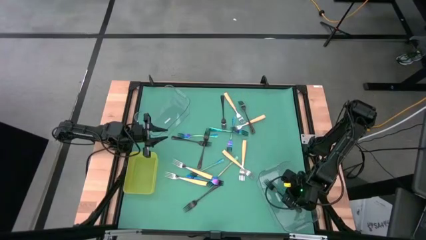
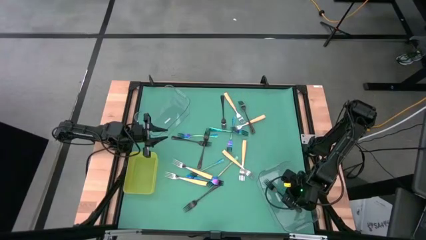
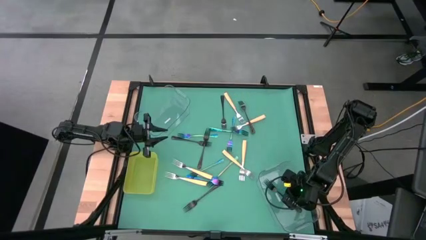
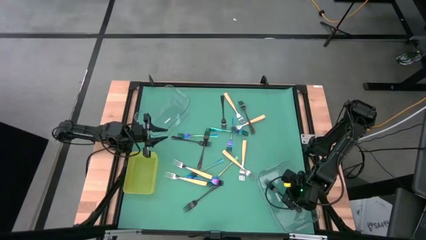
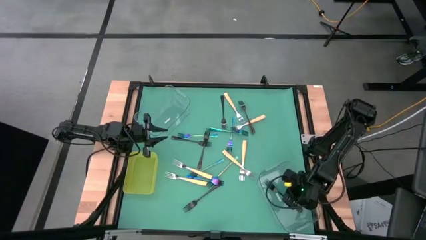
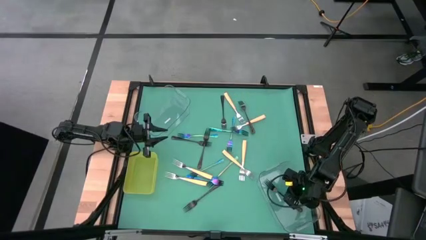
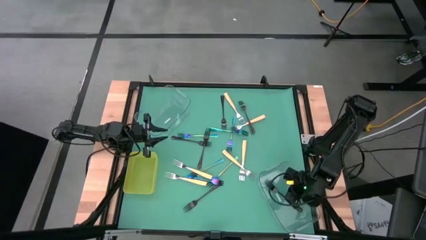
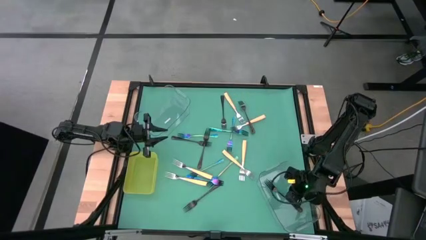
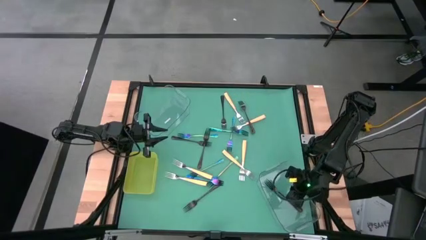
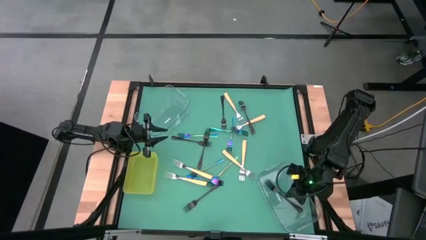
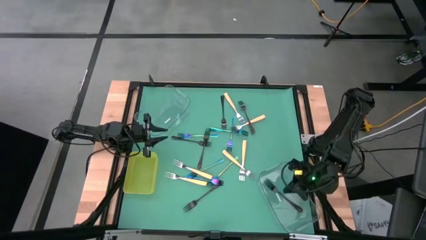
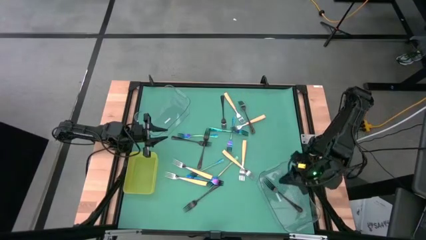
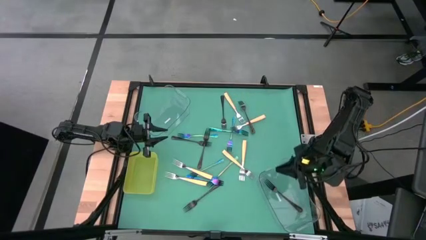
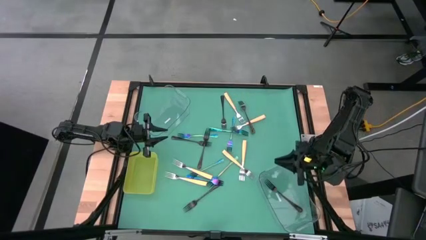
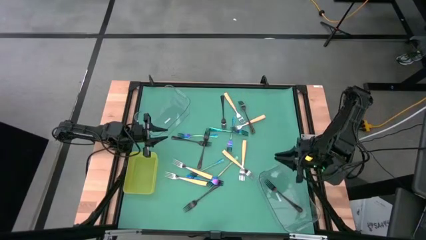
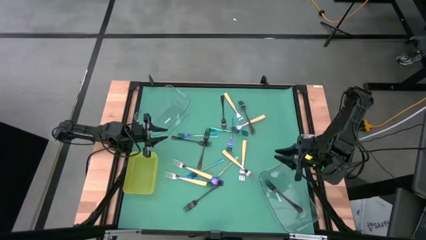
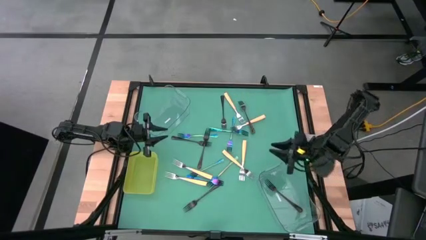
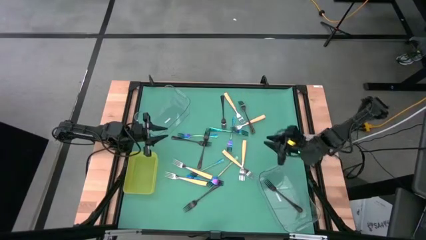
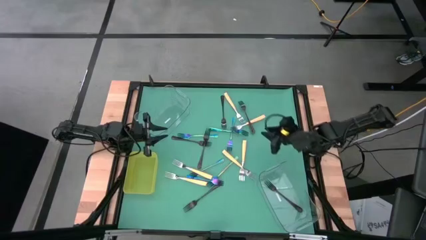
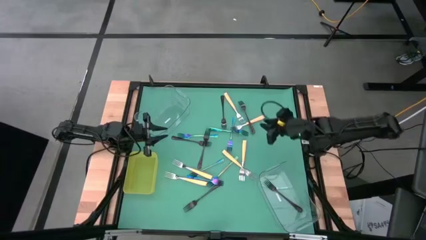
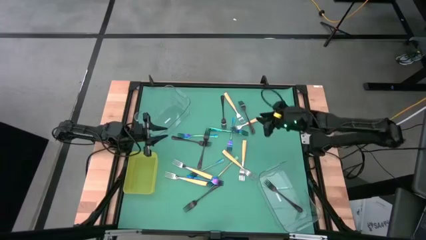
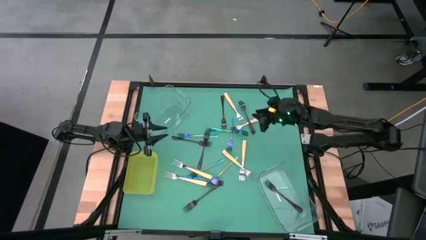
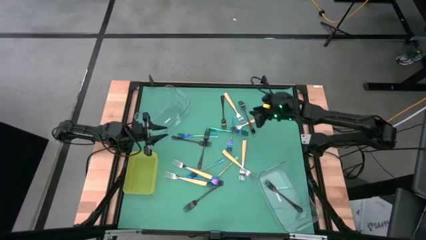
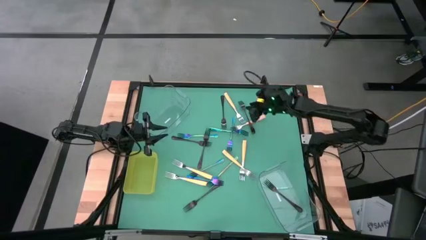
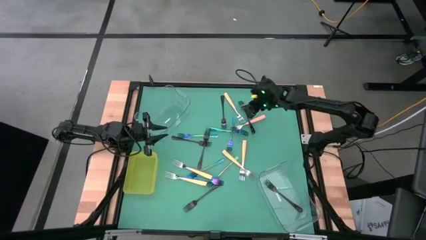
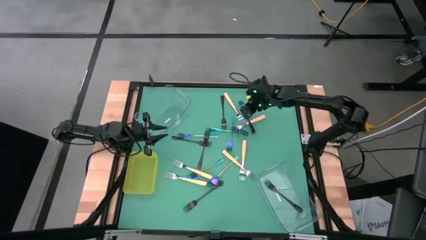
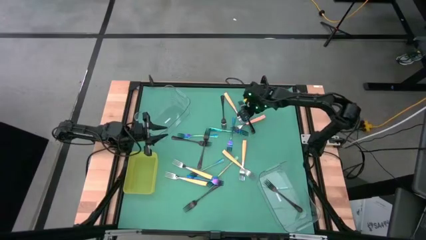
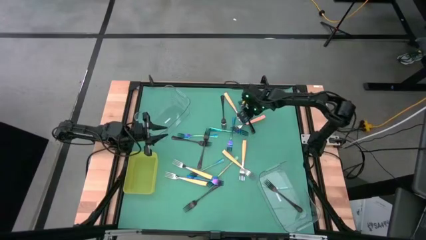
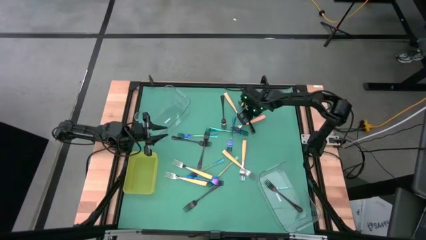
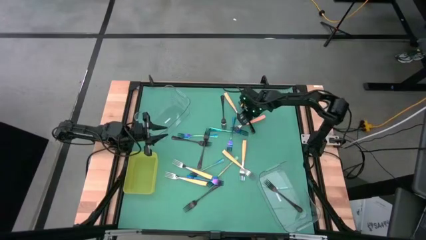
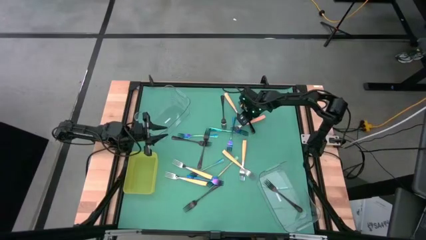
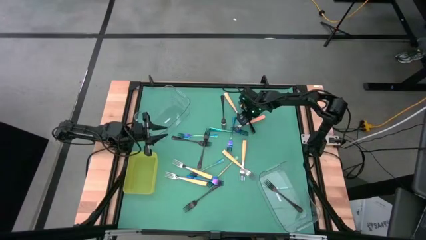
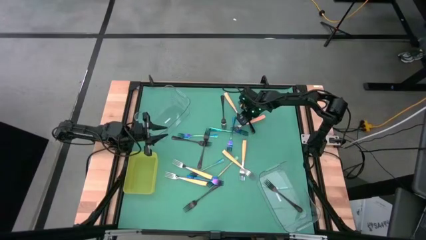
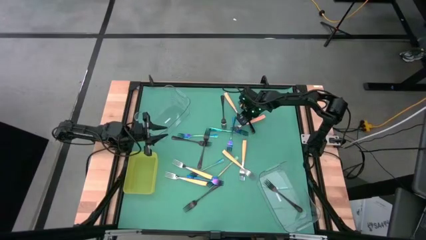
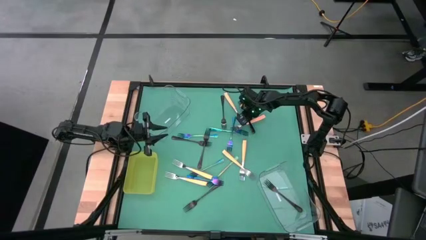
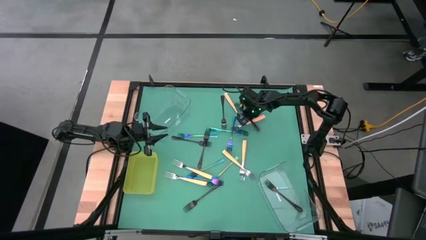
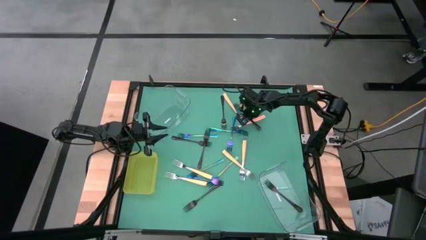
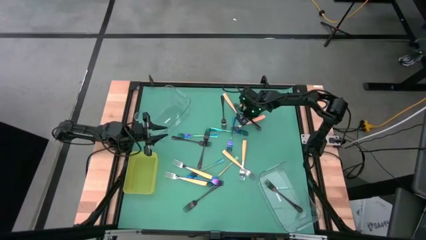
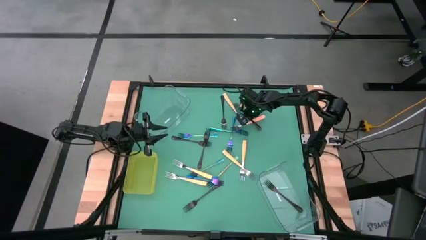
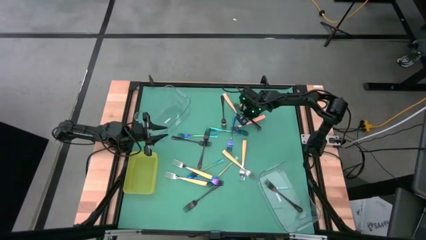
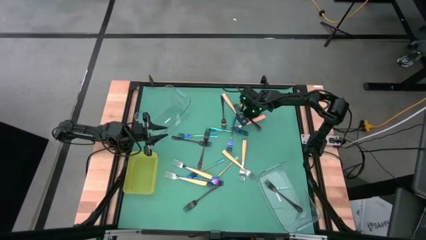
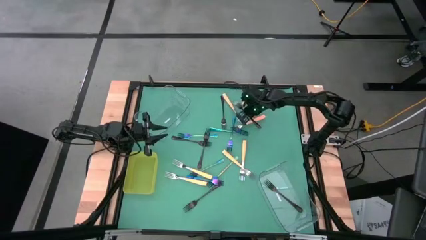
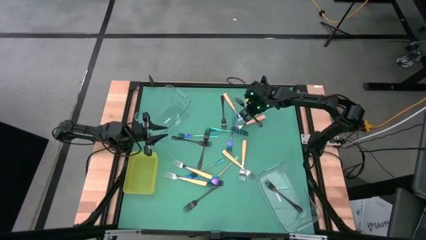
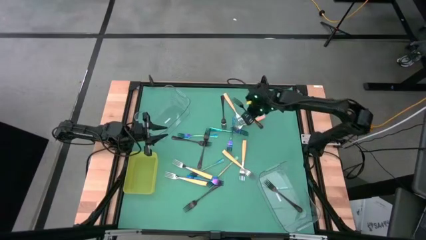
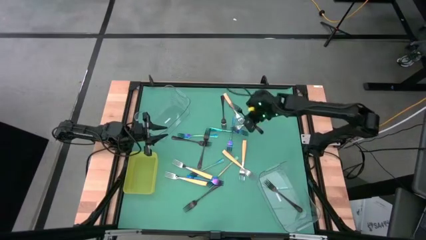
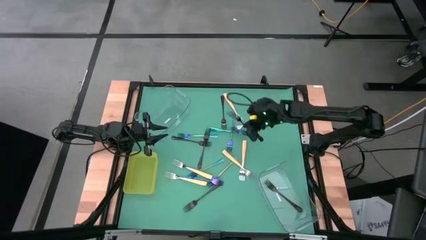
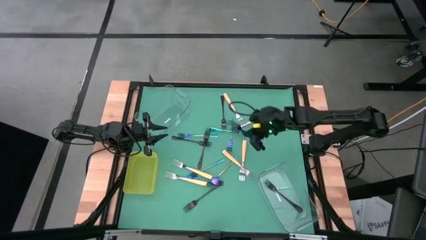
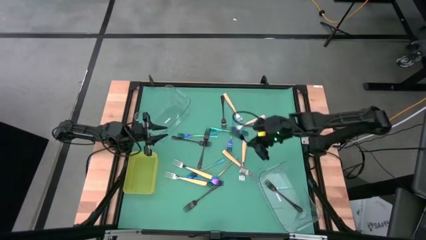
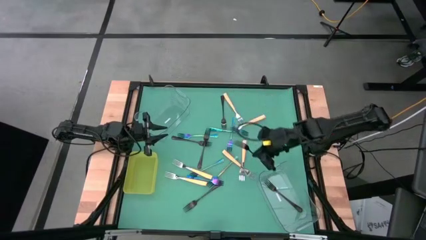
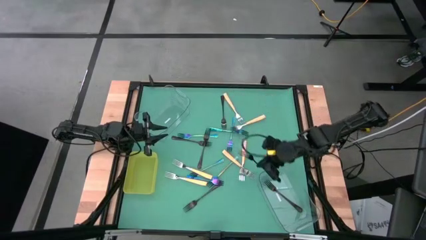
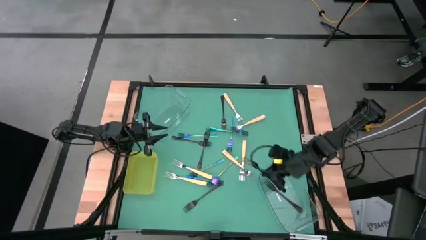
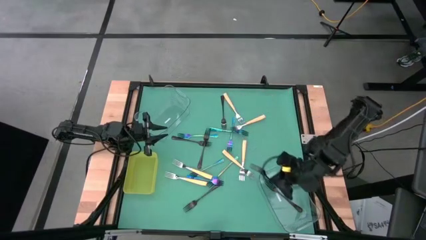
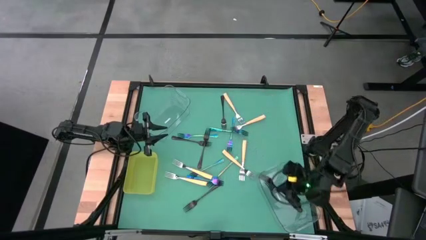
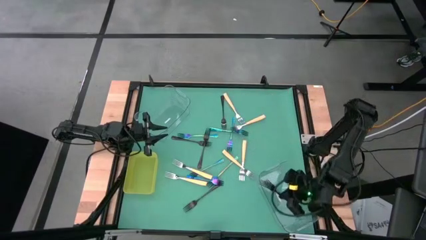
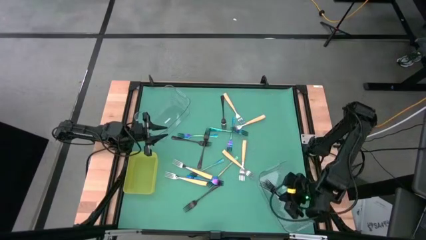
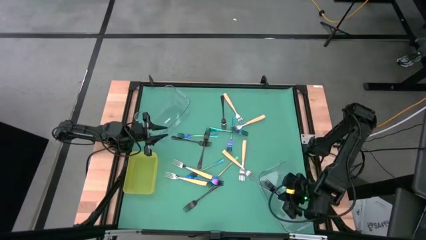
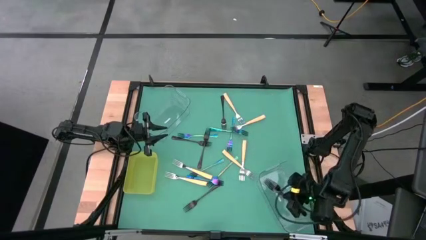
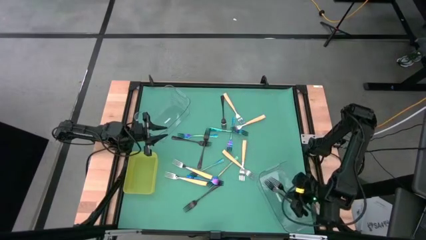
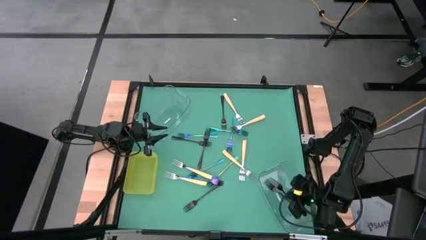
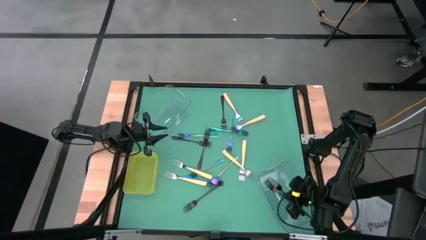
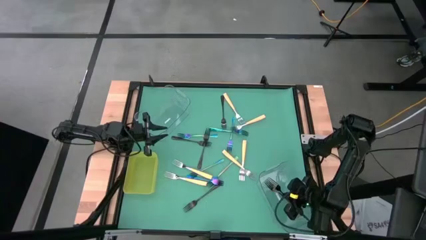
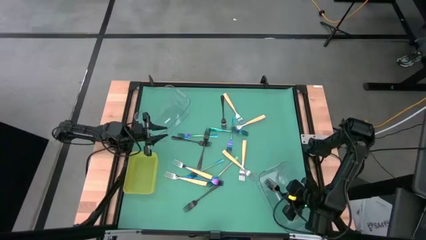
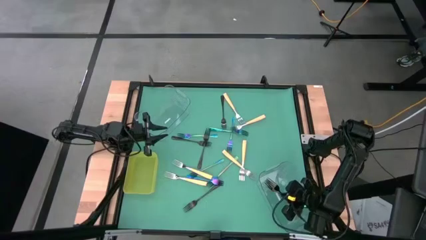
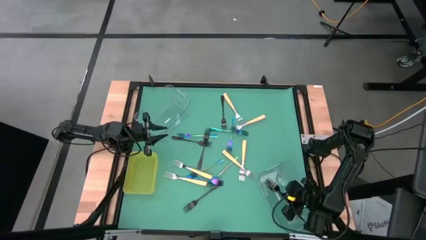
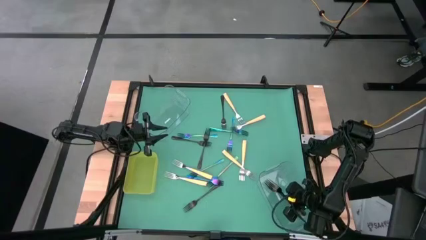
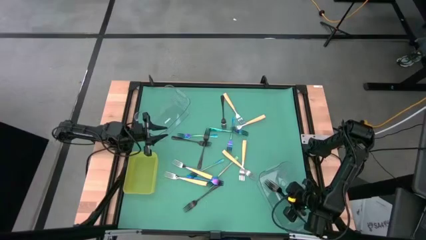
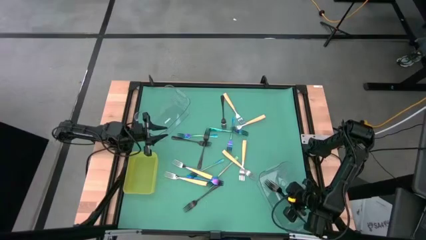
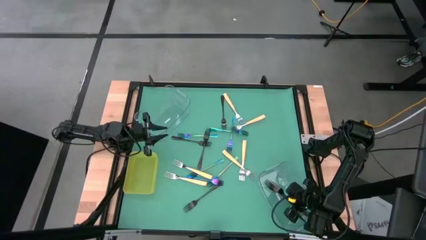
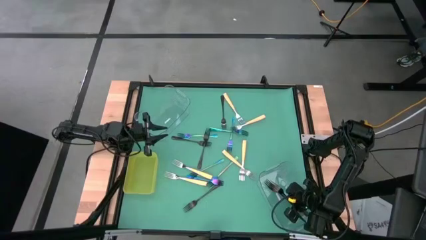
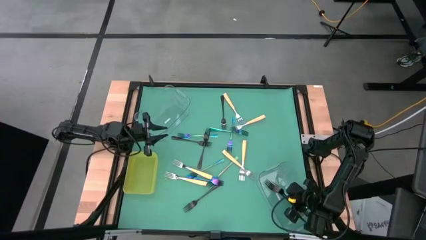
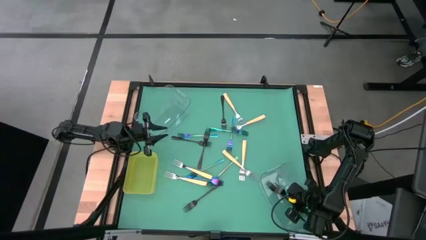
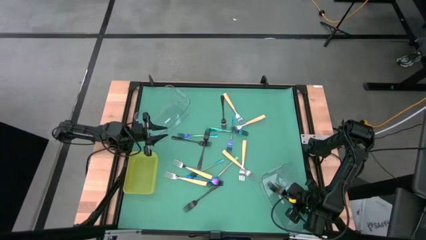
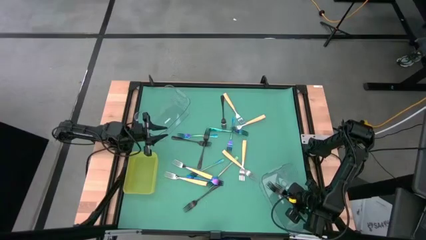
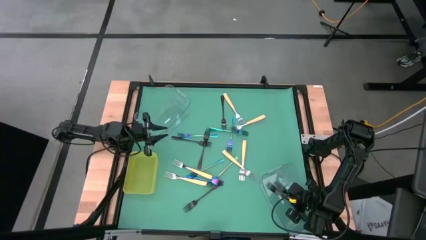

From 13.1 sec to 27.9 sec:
Task: Sort silverware by color (type)
Put the black fork in the bottom transparent bin
